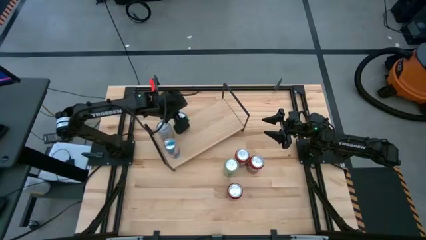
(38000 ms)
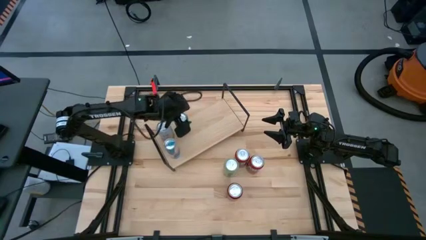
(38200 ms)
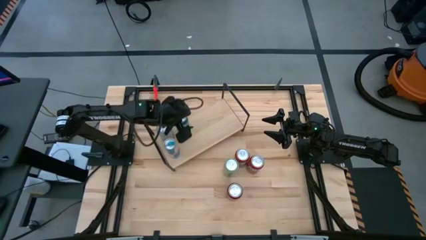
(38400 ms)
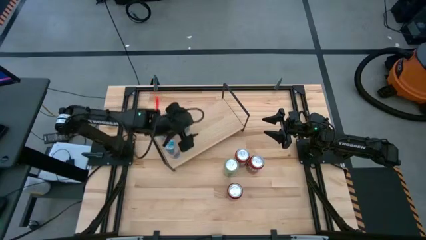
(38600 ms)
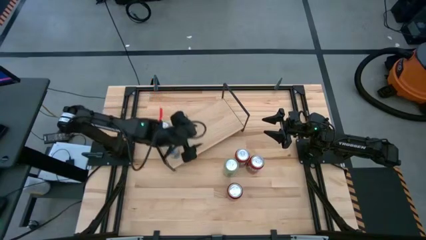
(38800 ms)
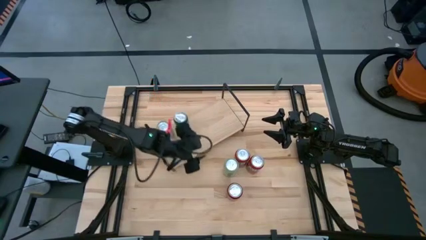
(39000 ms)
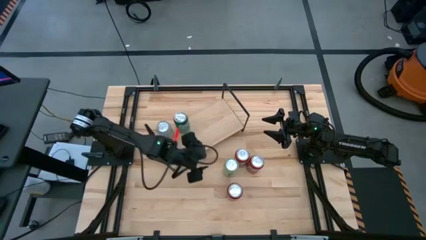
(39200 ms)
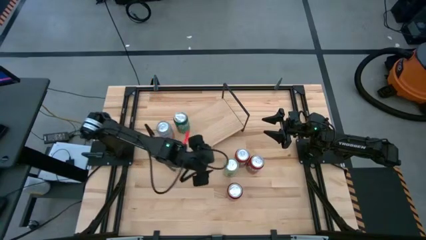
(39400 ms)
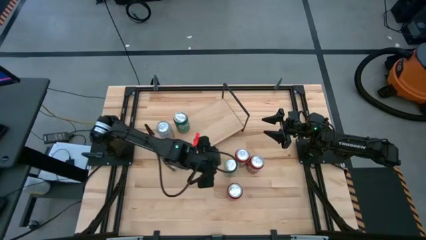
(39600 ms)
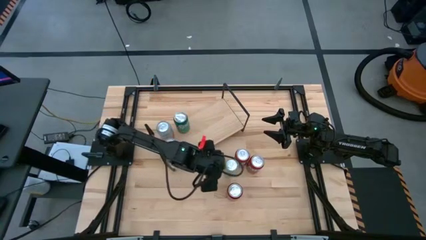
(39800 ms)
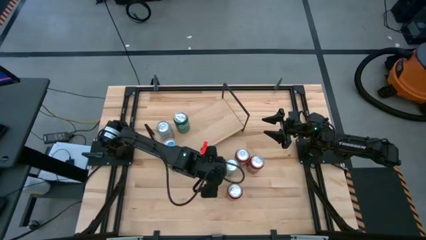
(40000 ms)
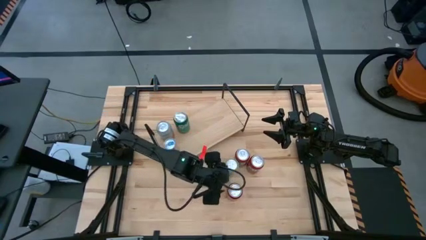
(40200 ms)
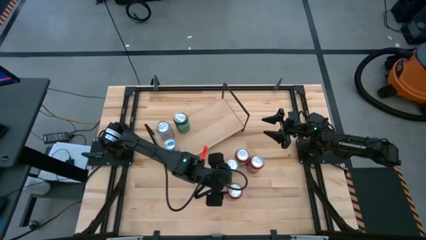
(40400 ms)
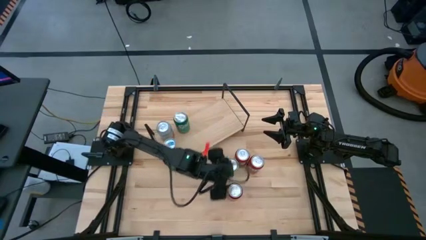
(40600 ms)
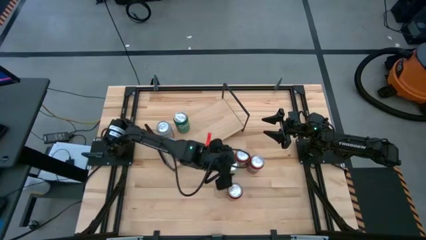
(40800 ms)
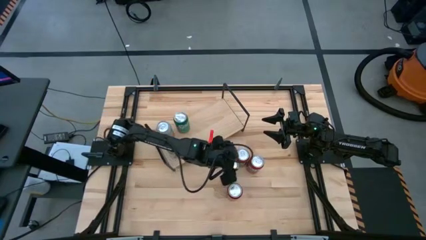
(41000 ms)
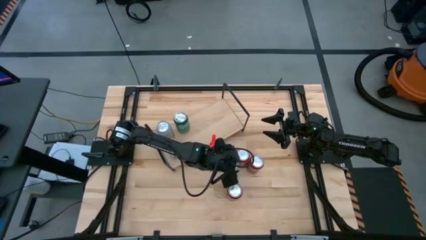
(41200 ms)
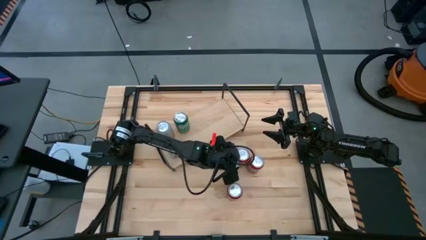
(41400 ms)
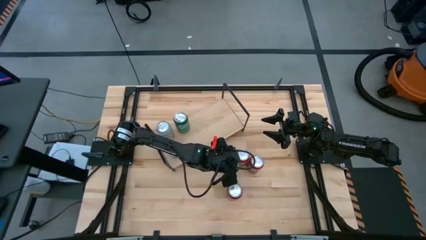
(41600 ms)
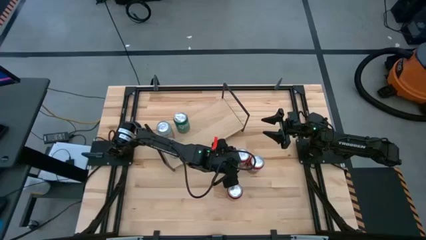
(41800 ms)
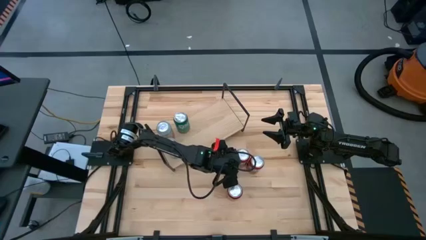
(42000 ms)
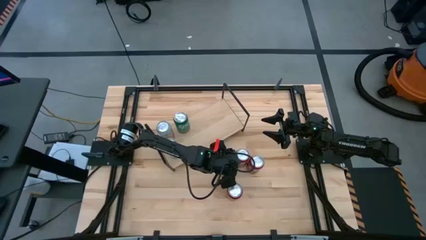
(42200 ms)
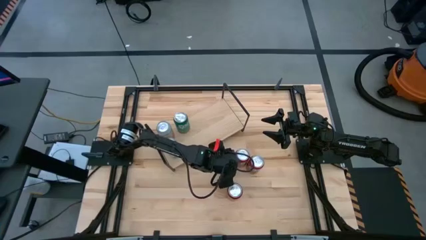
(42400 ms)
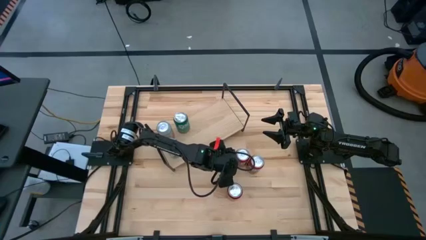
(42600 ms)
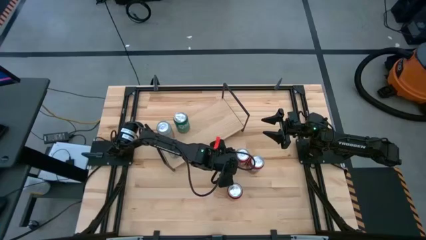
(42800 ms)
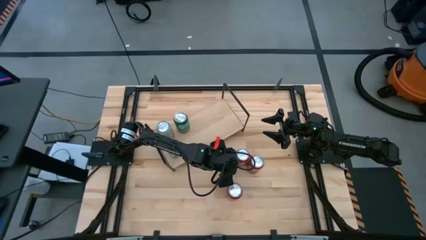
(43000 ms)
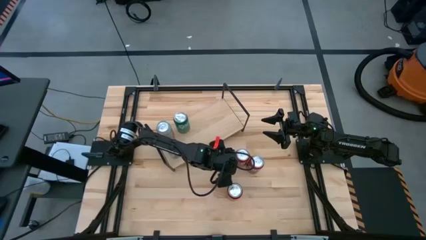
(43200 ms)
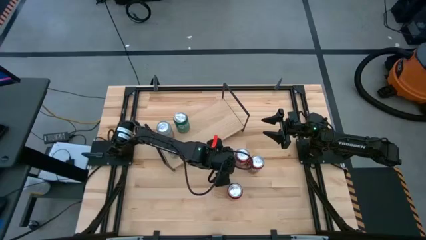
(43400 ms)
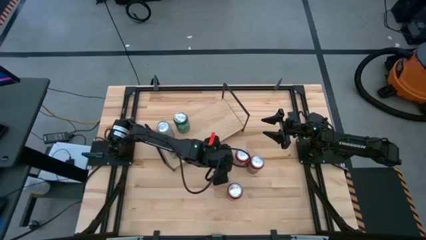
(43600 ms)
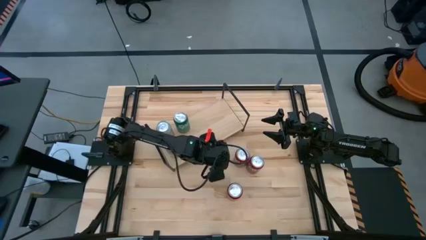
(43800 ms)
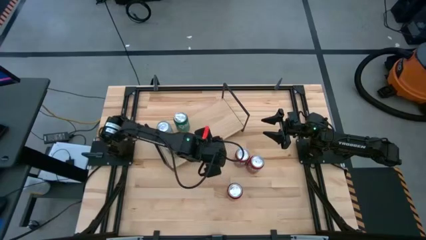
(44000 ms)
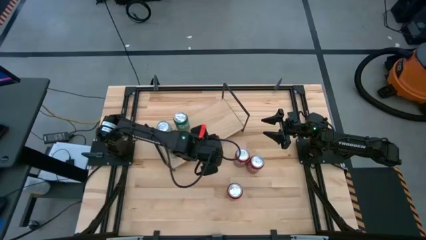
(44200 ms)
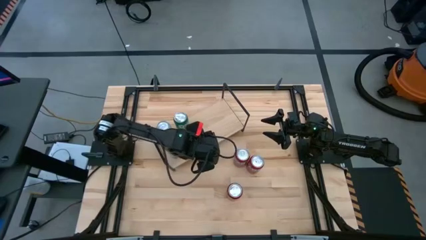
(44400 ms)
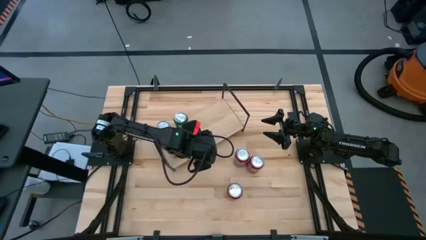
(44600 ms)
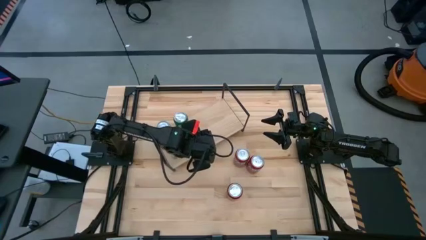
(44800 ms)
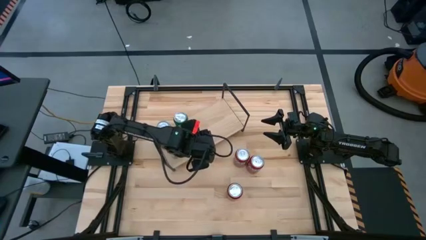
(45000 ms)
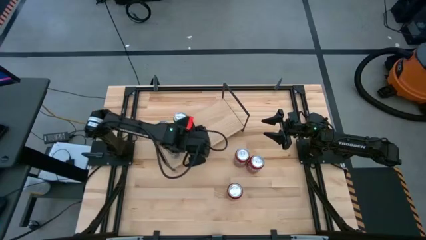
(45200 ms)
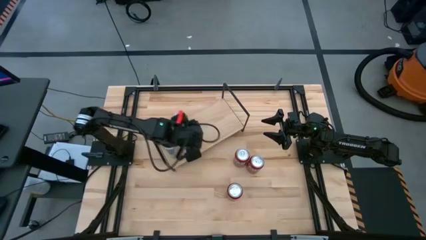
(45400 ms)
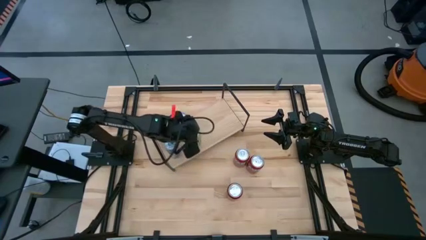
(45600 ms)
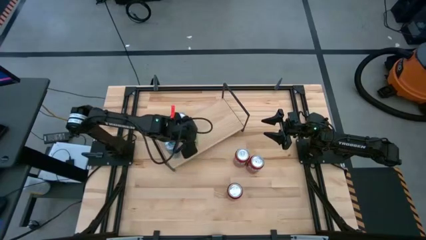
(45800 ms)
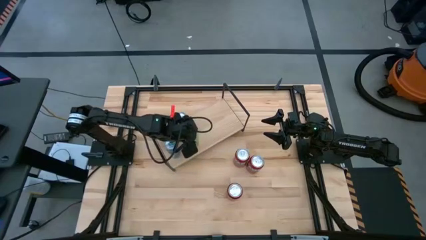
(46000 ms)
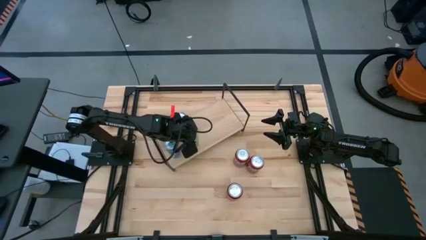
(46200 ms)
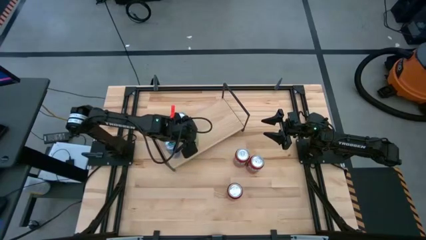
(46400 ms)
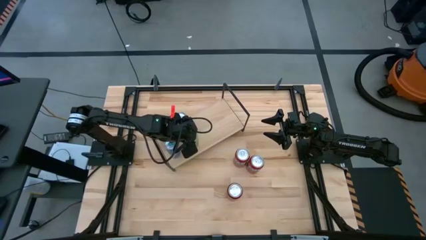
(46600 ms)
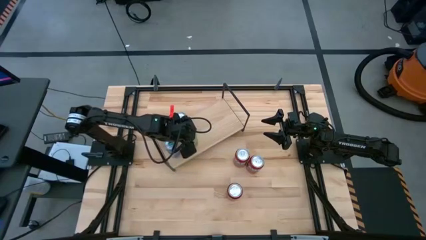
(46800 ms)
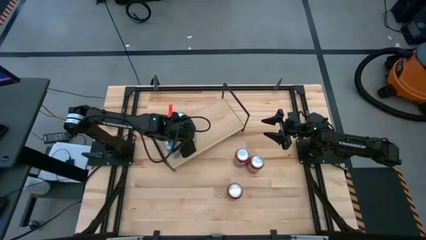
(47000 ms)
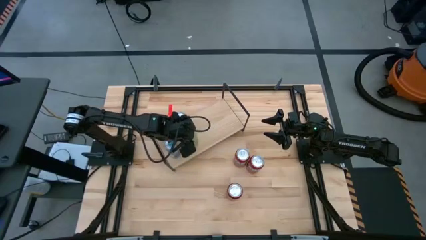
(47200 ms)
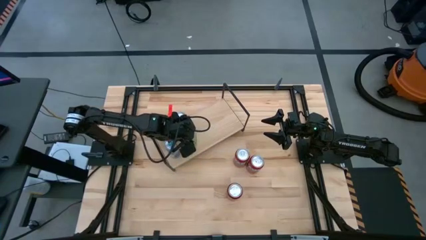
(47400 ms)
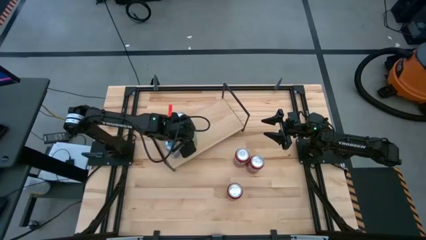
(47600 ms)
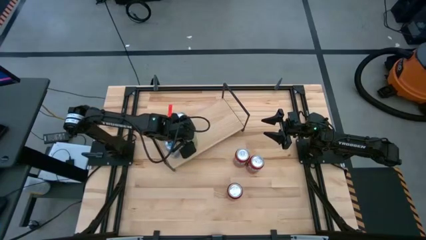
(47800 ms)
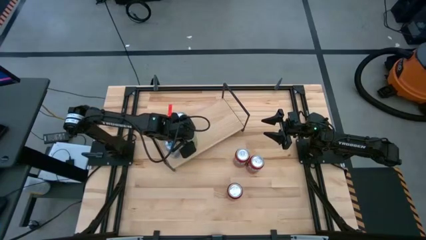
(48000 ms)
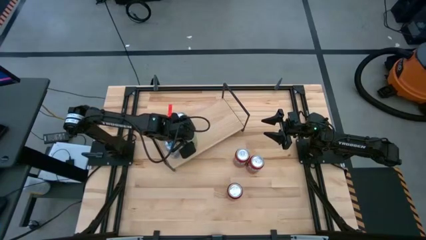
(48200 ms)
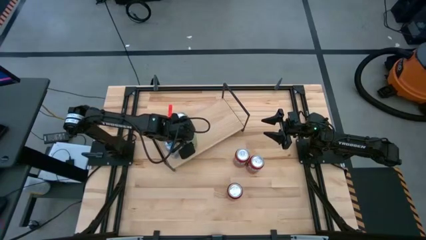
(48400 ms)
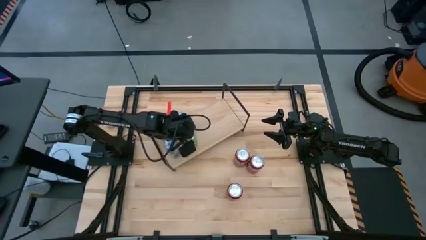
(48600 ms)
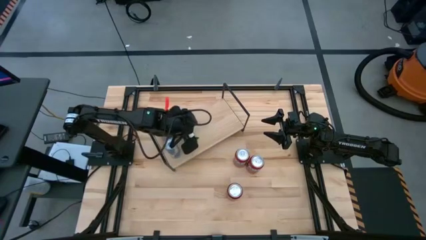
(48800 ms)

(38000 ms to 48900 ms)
Task: Place canned beverage on shelf
Put the light green soda can on the shelf
